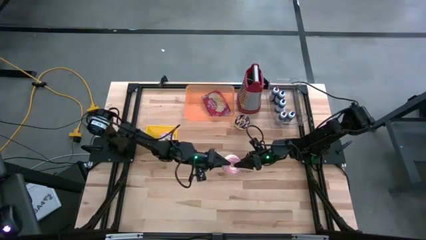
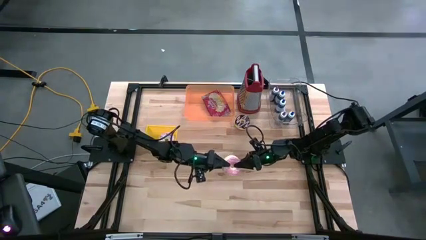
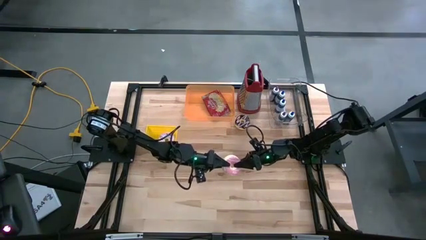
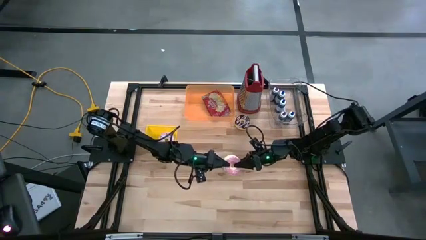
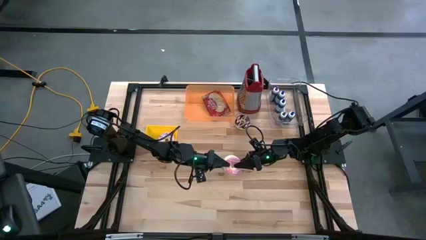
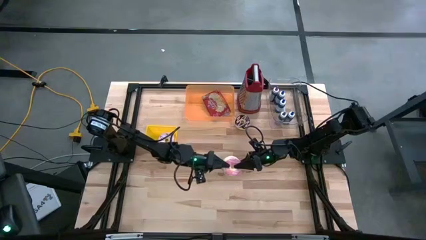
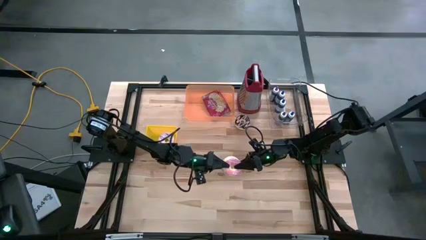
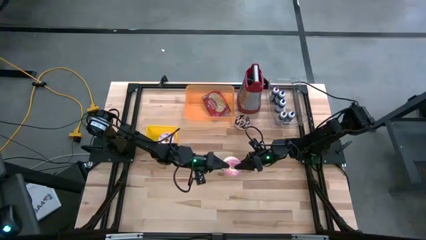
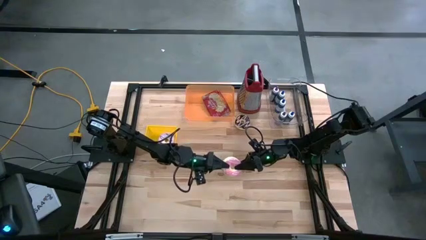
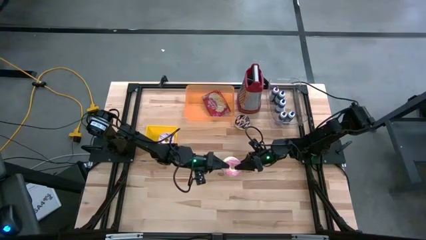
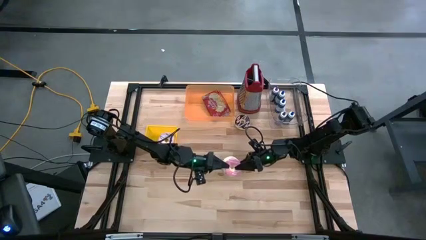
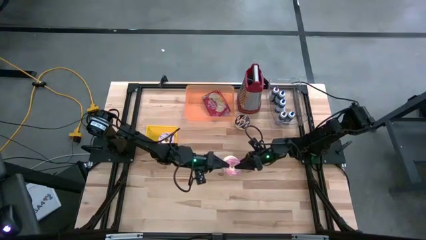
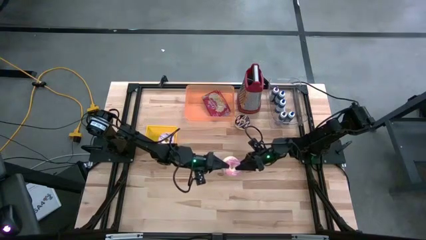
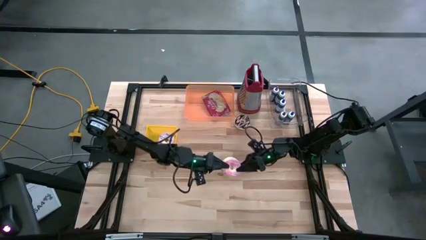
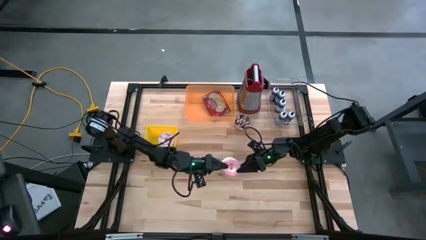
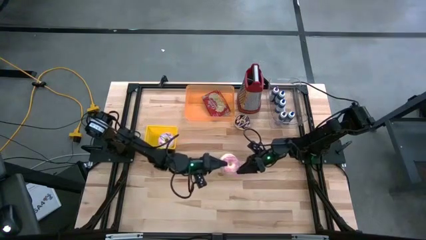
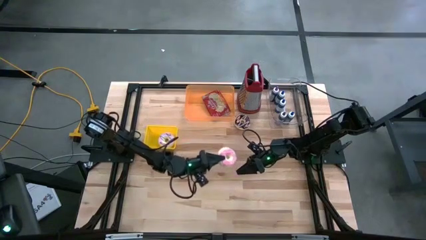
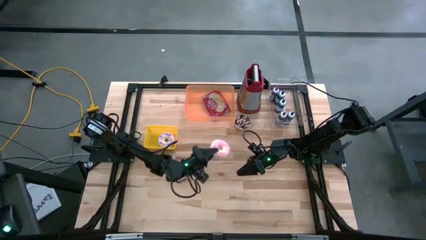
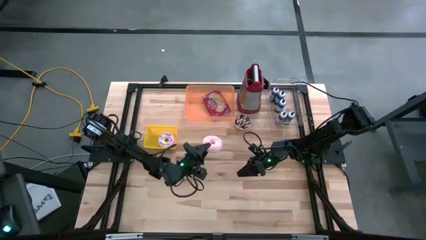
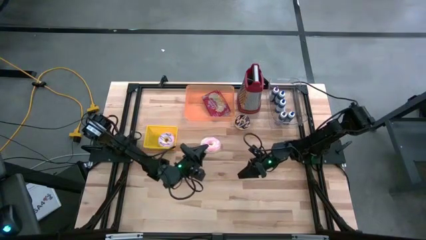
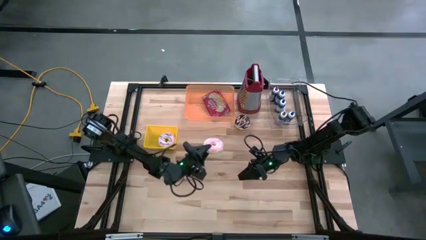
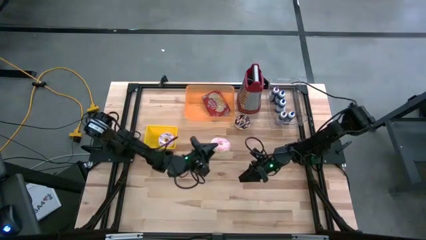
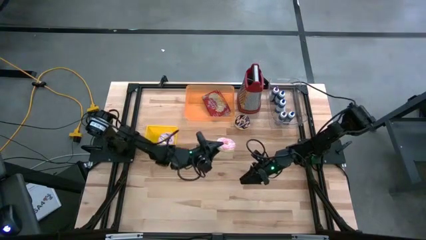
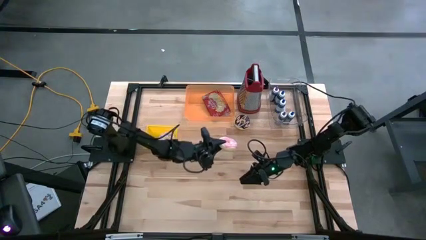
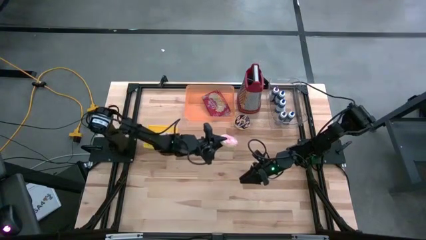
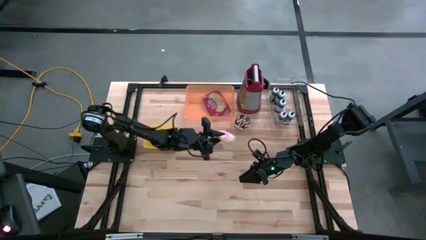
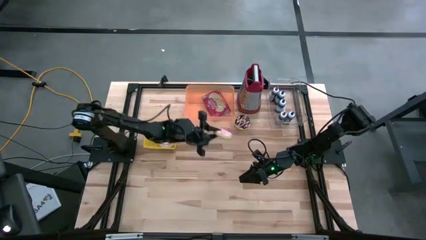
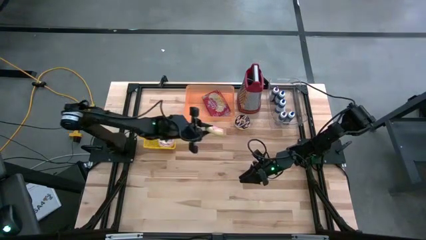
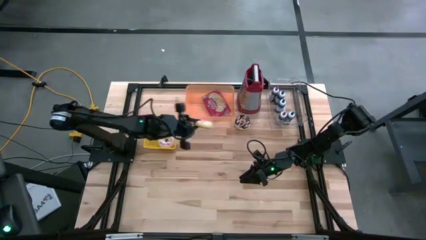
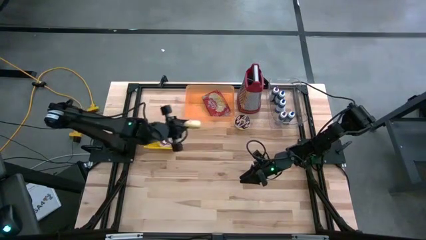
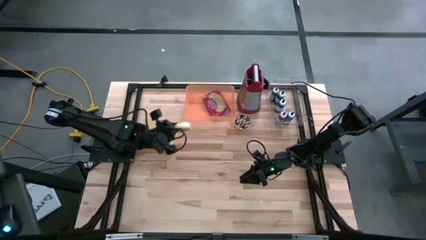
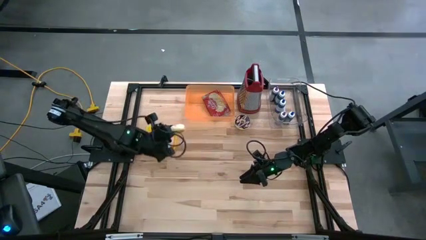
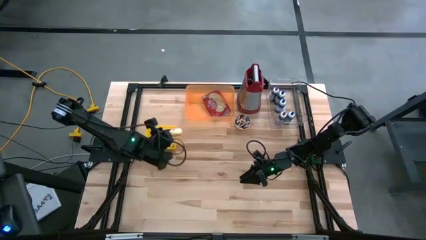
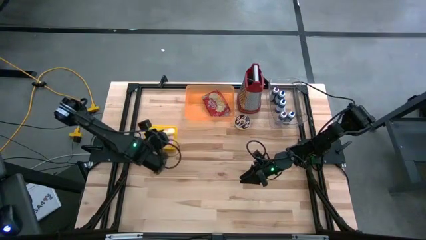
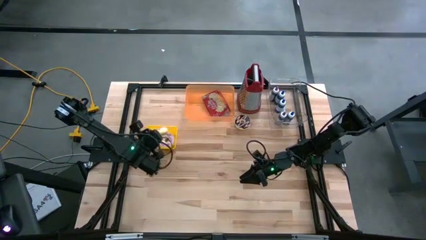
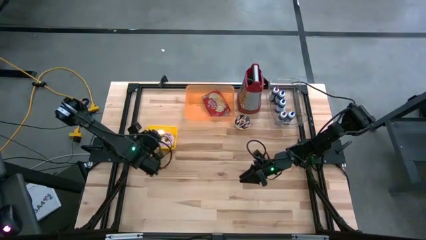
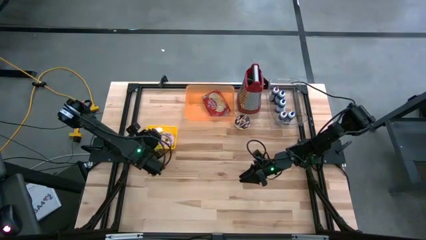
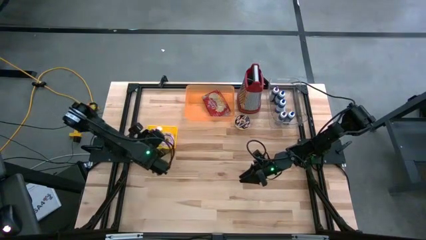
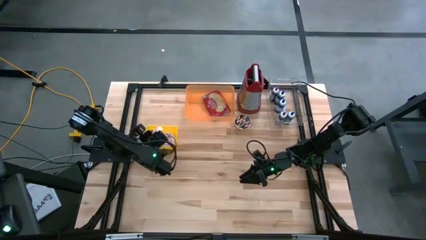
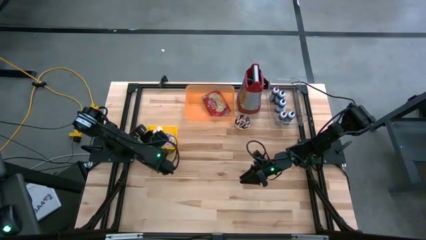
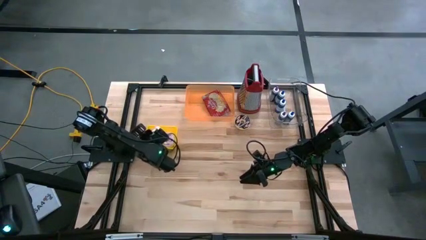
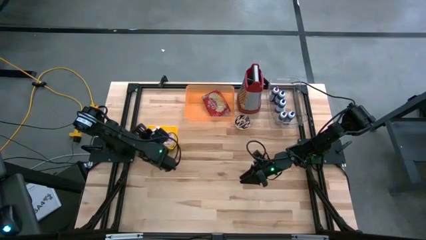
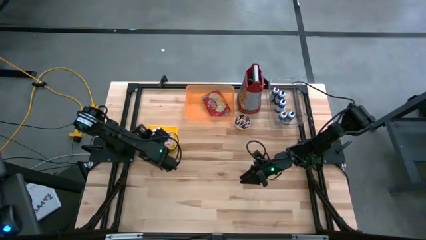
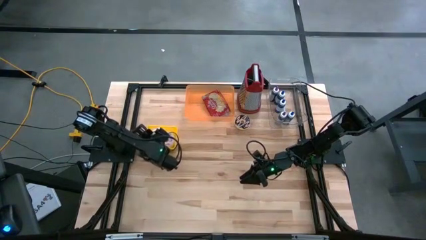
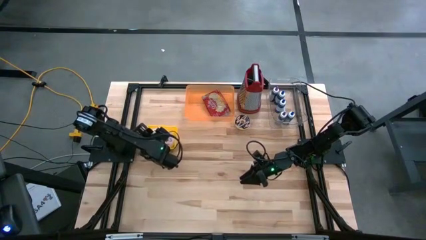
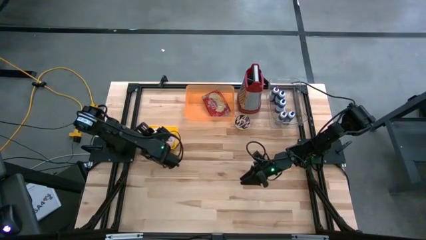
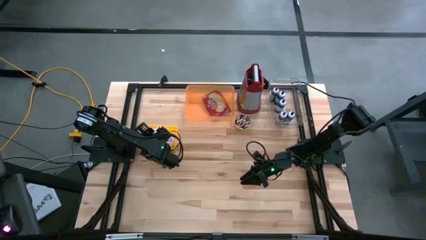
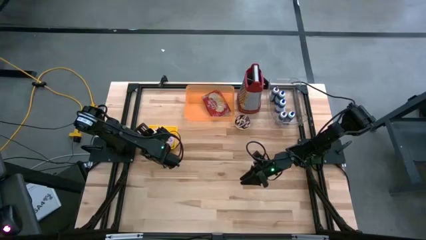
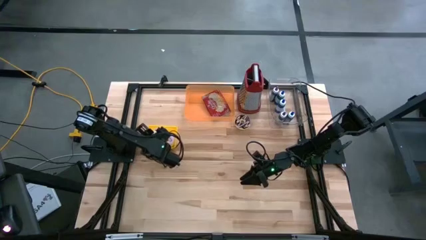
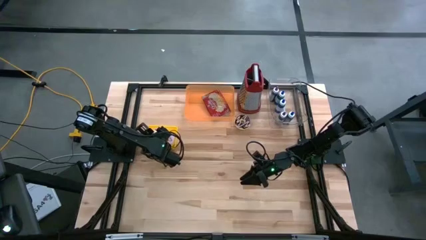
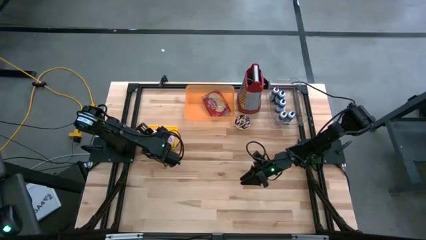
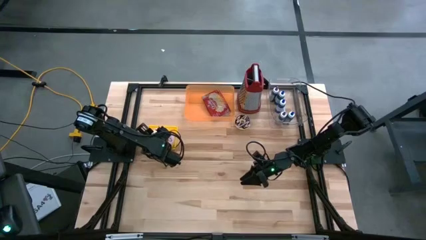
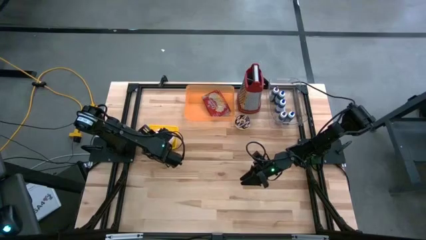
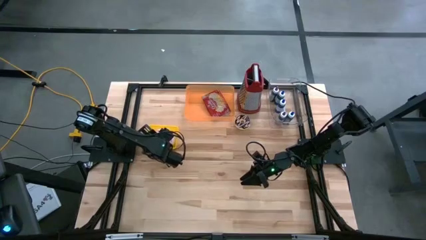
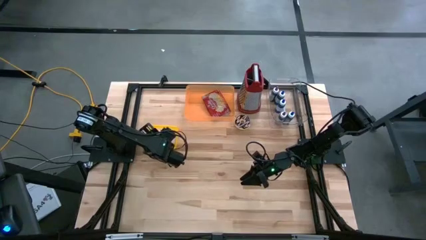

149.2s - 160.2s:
Task: Pick & Place Food Item
Put the pink donut into the yellow bin

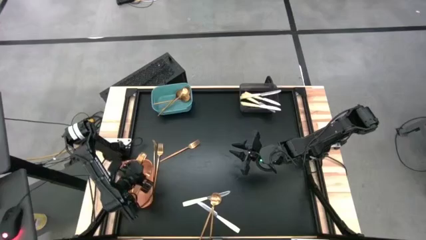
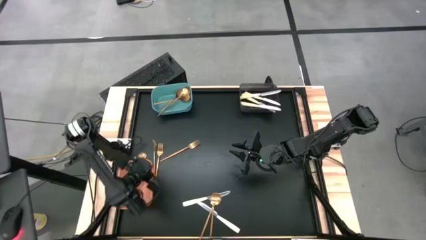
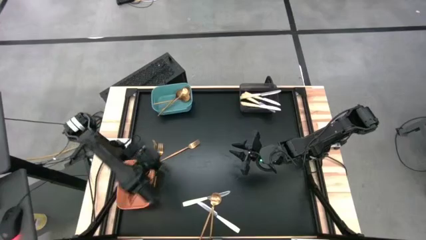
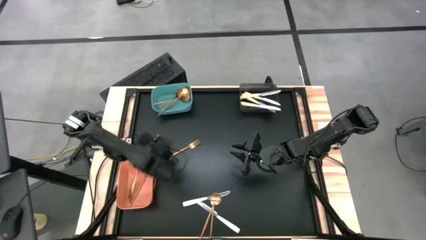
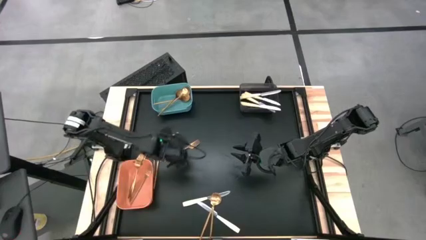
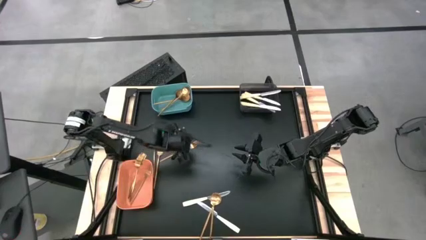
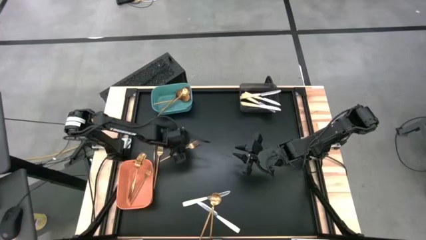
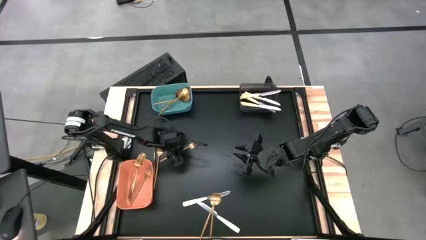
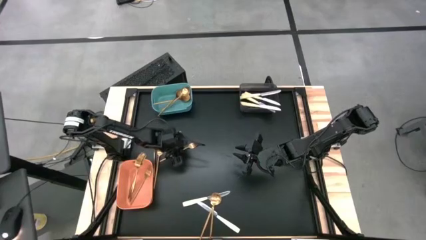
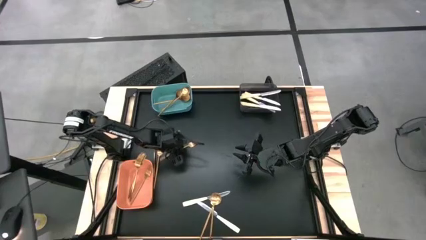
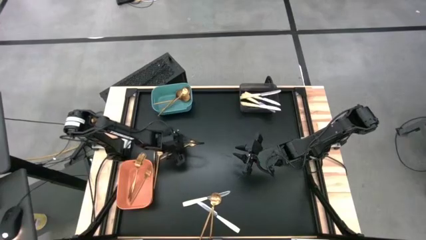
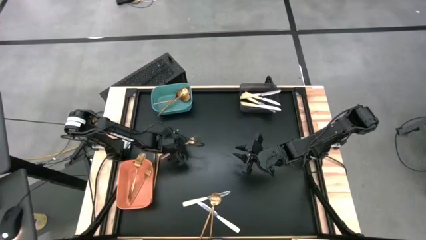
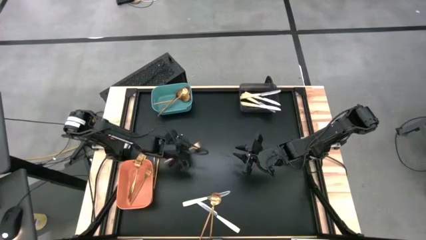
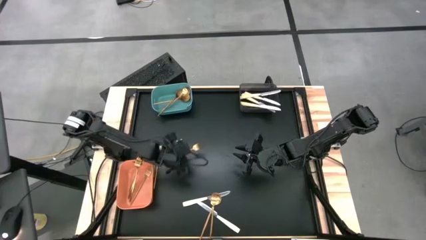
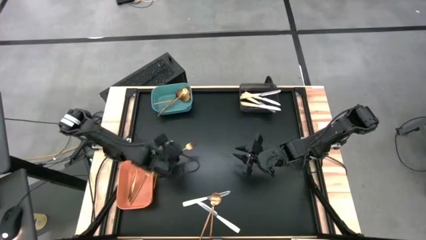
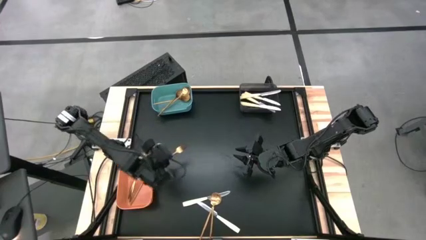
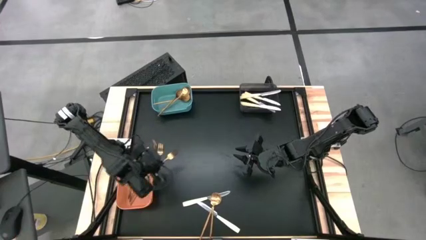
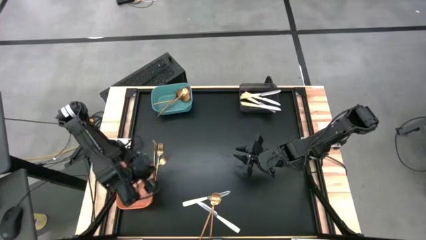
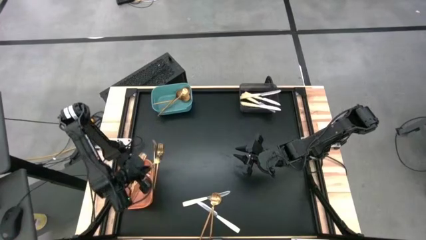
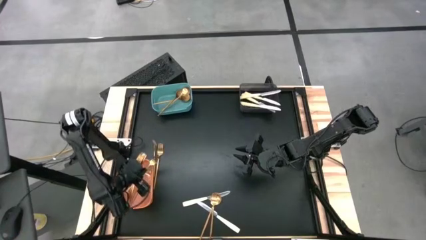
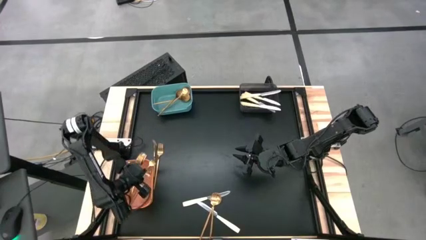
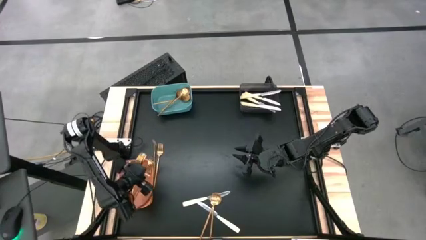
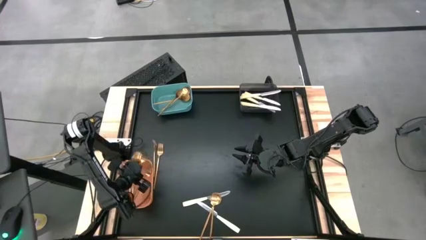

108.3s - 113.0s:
Task: Sort silverware by color (type)
Put the gold fork into the orange bin

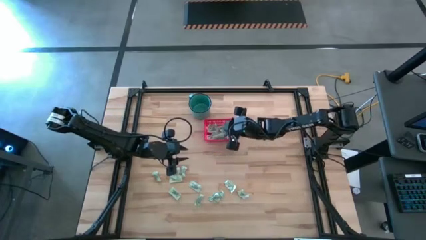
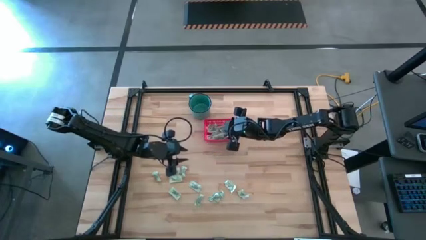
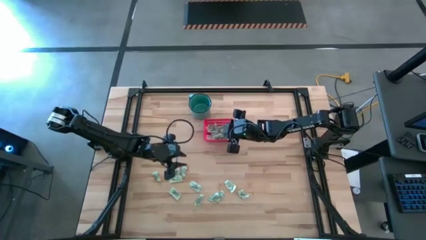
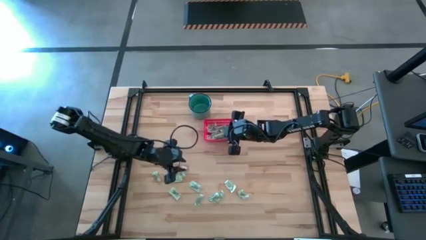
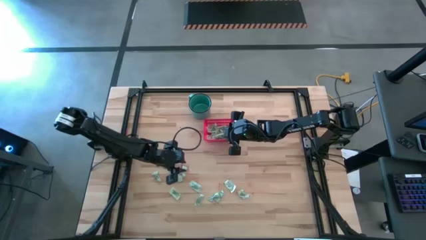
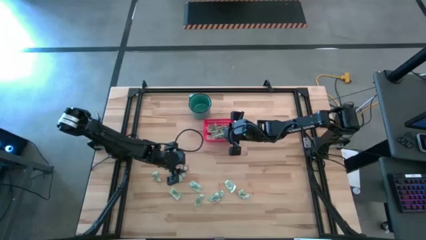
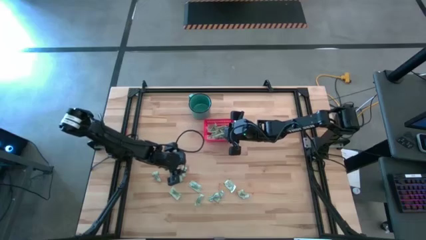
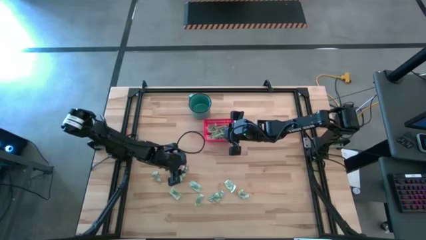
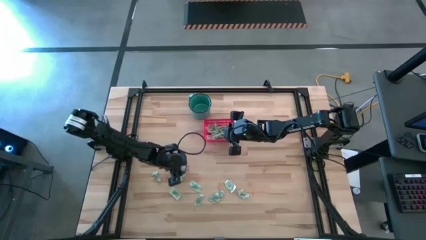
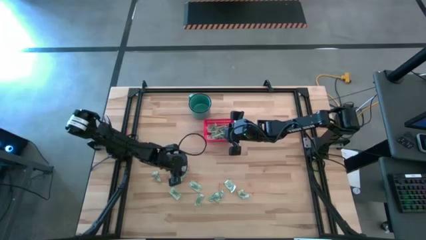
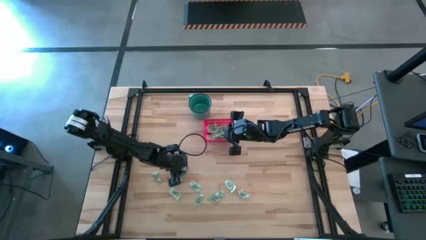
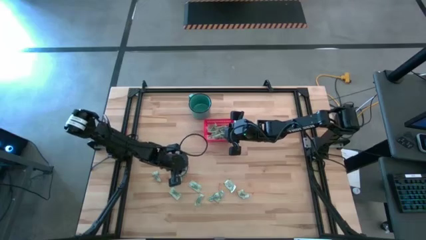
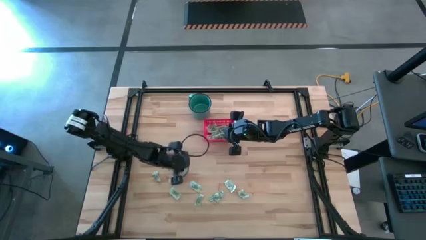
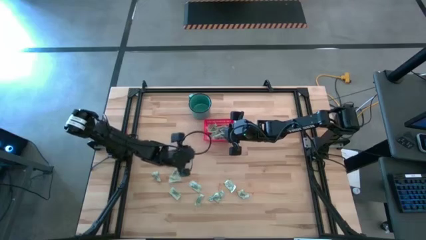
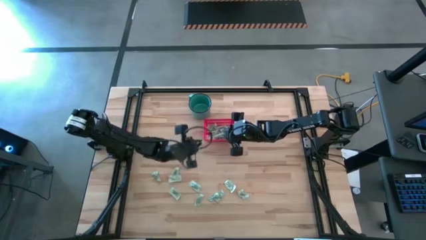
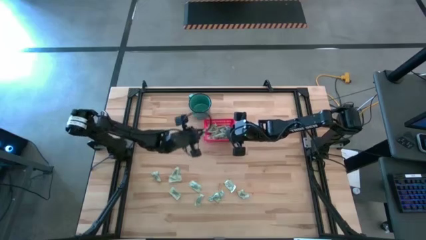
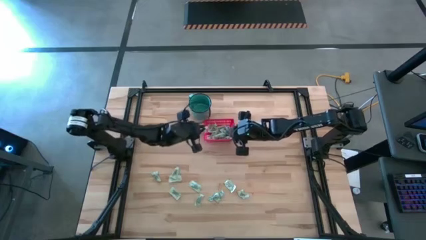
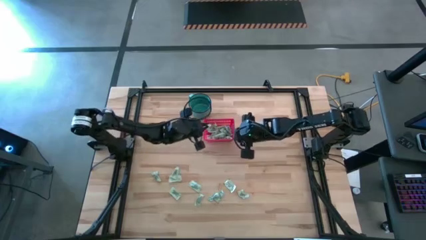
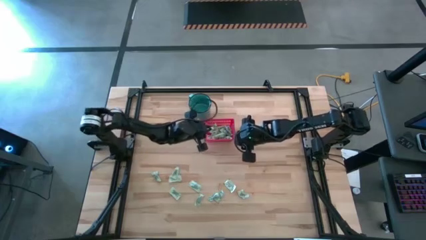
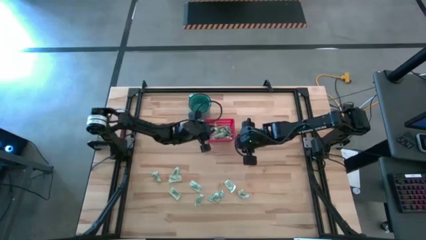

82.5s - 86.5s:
Task: Pick and place items into bin
Put the light green stevia packet into the red bin
